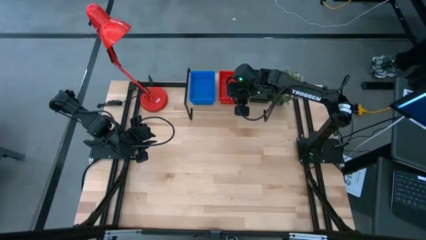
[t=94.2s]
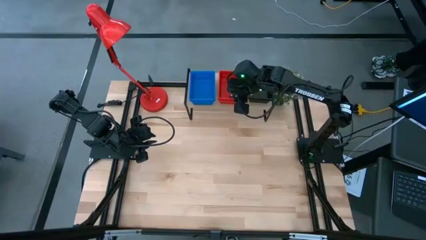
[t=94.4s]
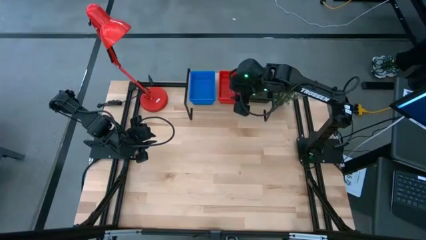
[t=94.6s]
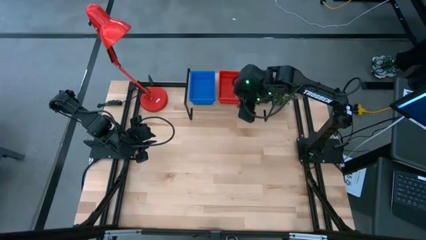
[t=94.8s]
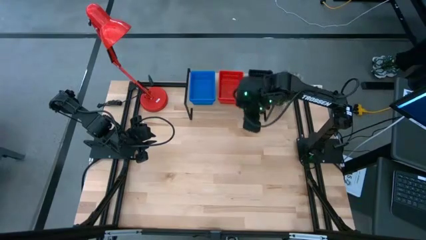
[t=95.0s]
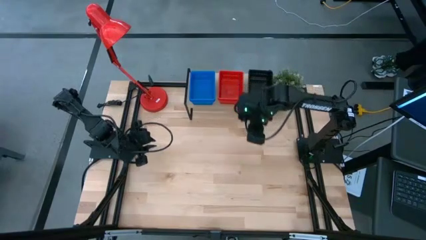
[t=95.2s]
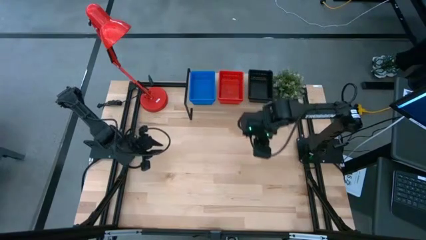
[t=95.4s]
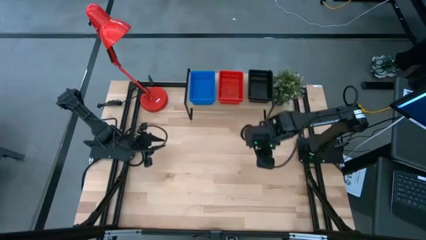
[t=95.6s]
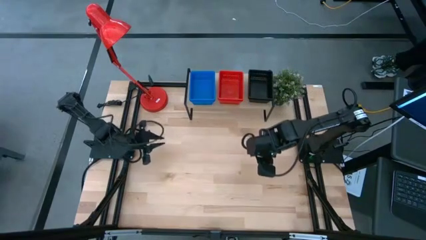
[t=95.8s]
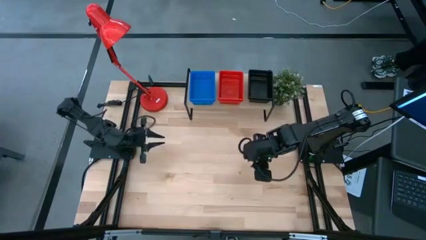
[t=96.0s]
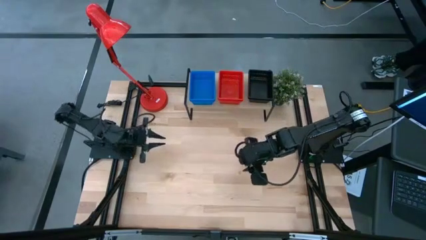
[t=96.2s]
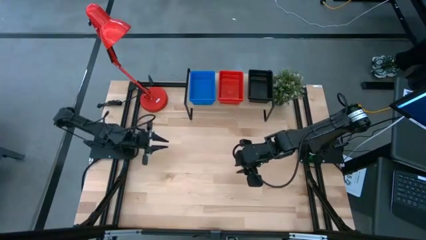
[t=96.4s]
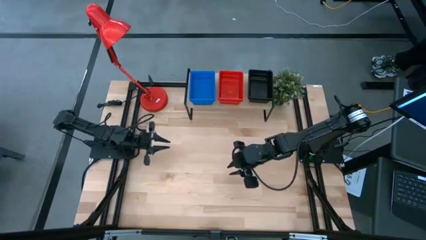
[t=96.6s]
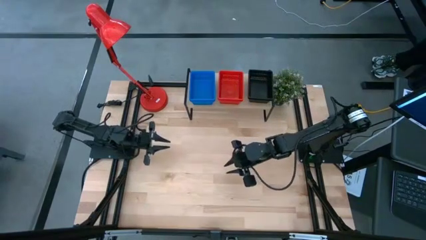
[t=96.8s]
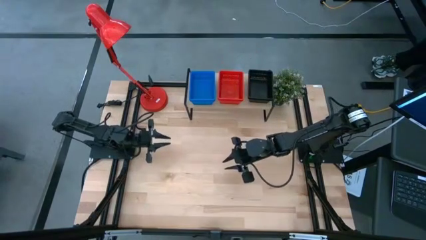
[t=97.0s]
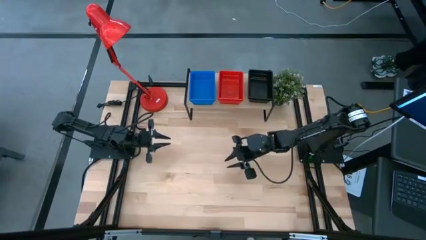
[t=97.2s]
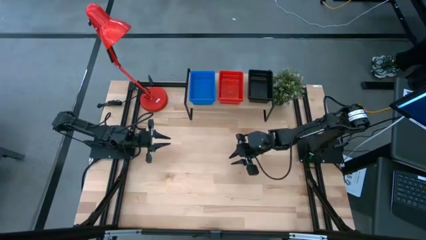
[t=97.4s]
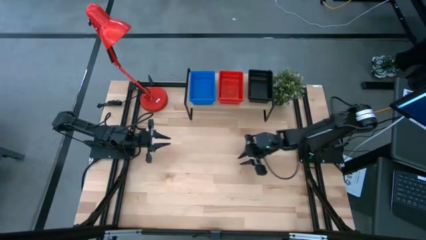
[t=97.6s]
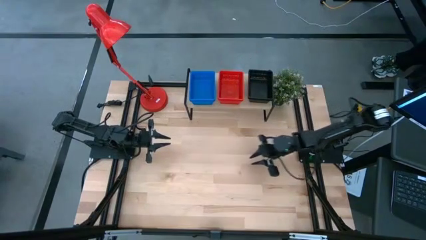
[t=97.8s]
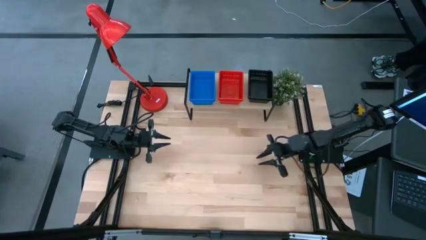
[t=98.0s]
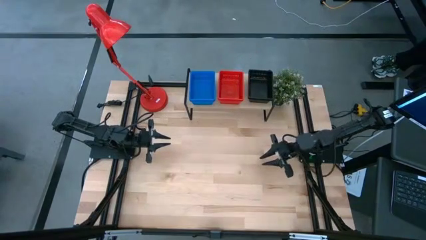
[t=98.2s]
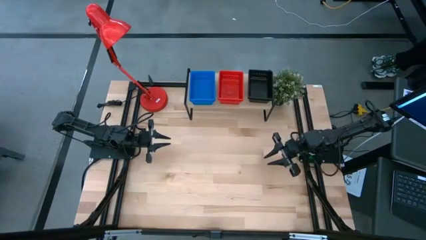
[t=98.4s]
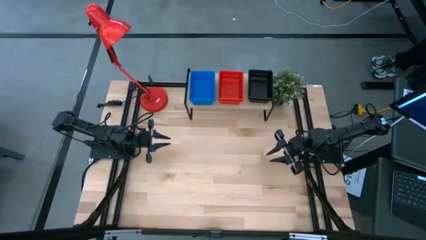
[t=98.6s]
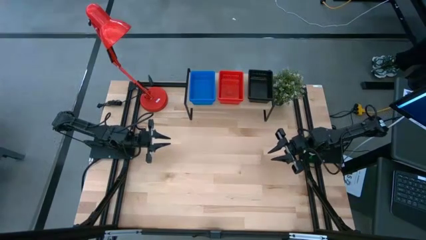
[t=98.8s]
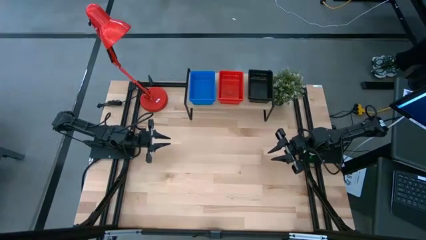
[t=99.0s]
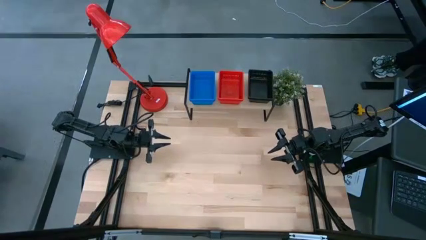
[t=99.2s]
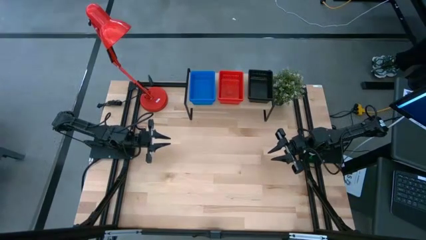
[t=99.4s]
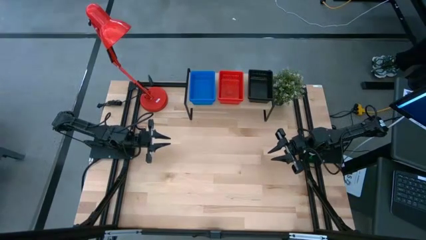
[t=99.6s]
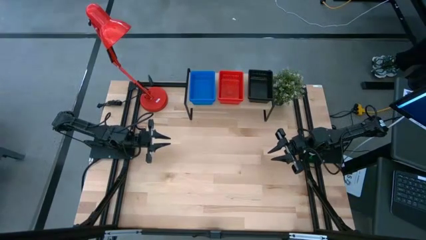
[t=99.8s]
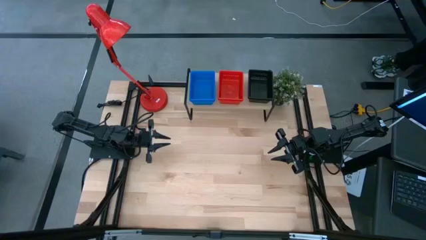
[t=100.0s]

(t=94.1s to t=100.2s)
Task: Stack baskets on shelf by color
Return to Home Position

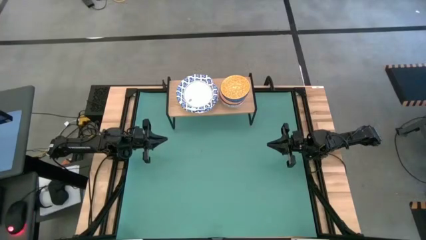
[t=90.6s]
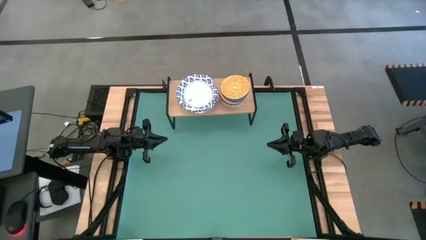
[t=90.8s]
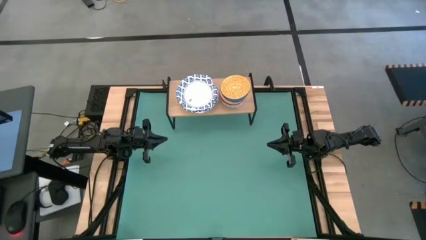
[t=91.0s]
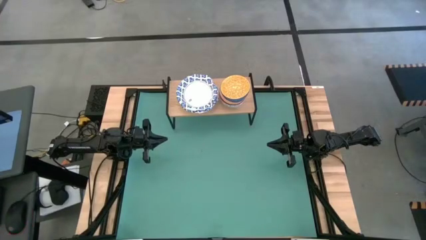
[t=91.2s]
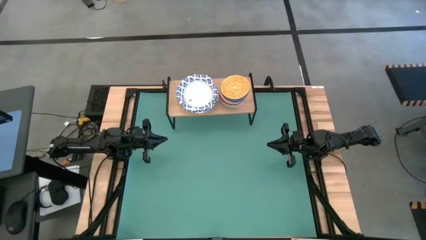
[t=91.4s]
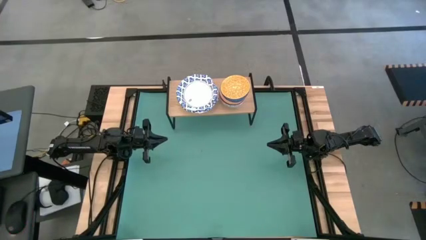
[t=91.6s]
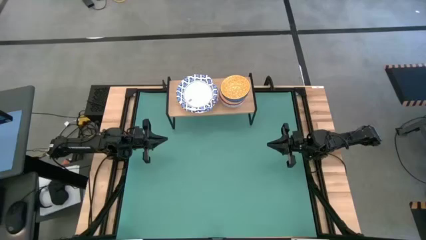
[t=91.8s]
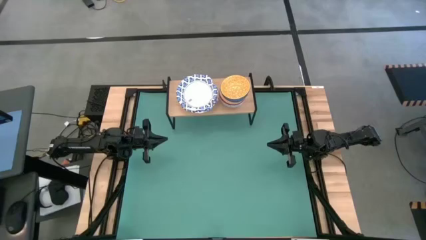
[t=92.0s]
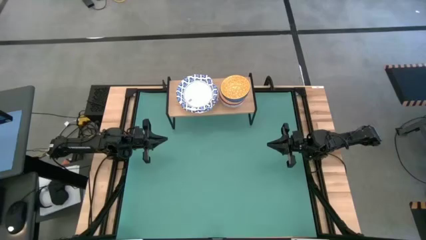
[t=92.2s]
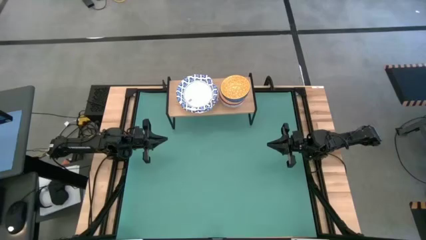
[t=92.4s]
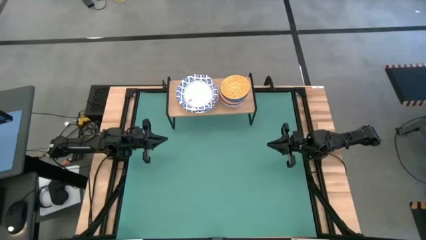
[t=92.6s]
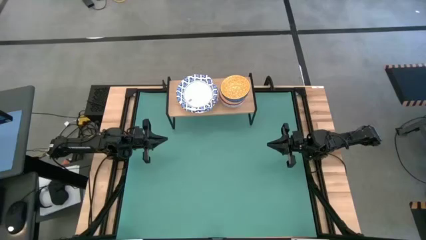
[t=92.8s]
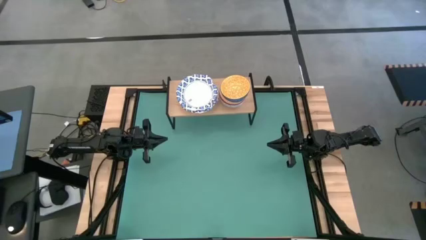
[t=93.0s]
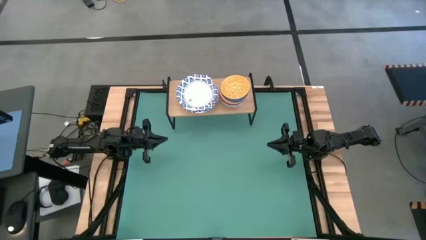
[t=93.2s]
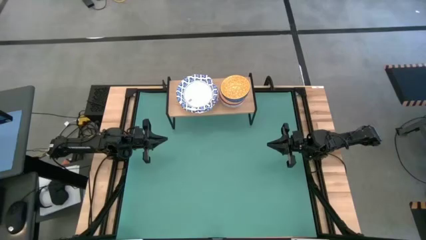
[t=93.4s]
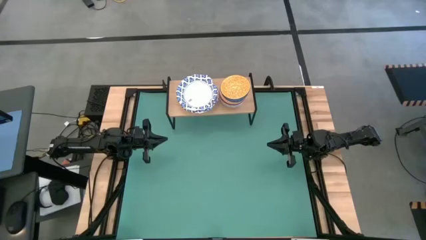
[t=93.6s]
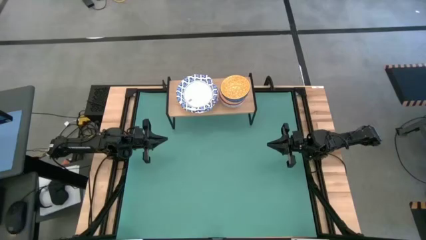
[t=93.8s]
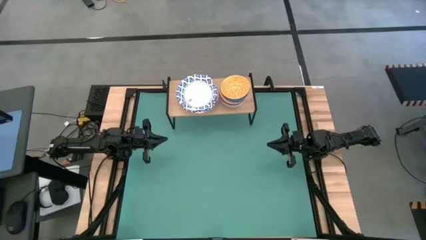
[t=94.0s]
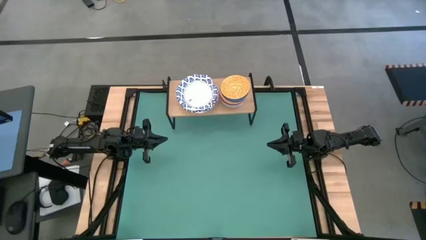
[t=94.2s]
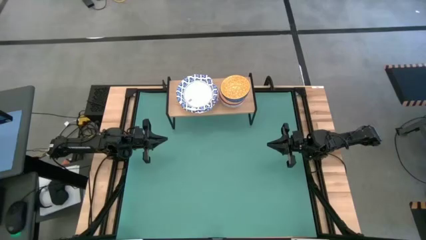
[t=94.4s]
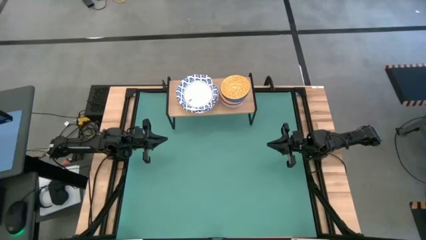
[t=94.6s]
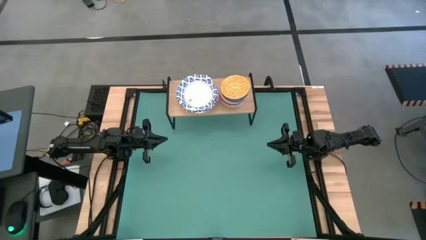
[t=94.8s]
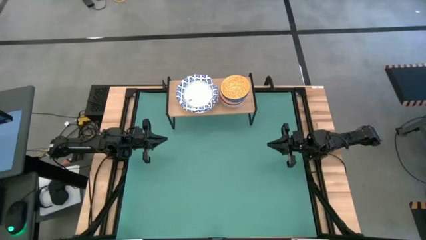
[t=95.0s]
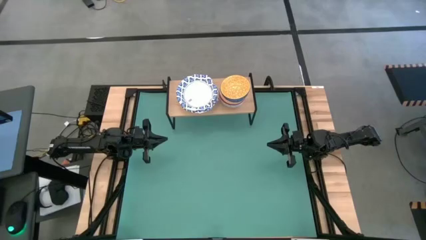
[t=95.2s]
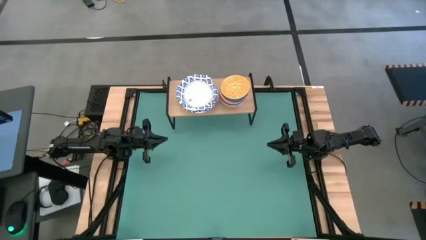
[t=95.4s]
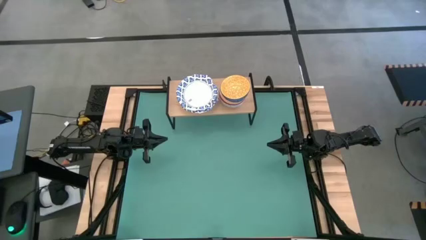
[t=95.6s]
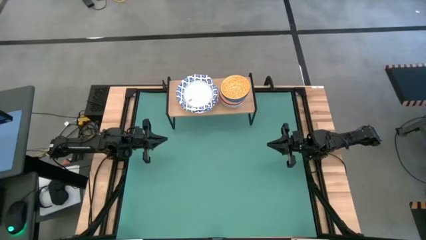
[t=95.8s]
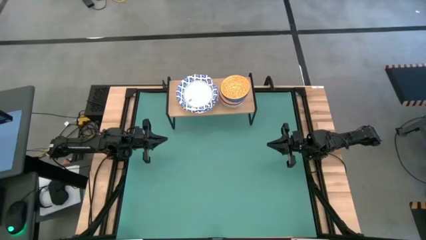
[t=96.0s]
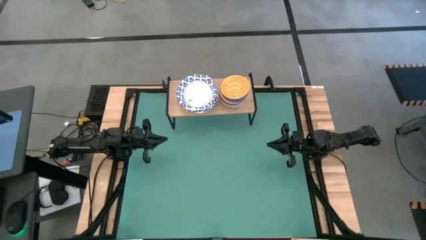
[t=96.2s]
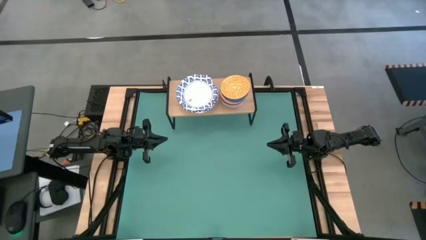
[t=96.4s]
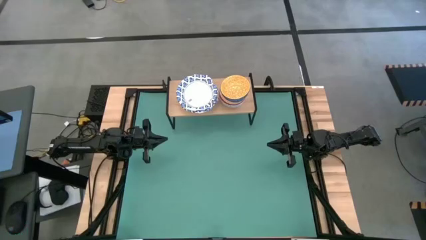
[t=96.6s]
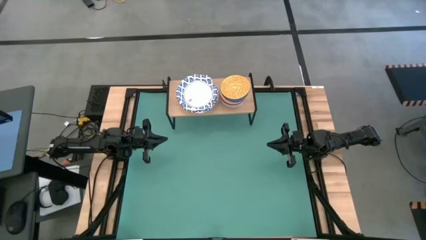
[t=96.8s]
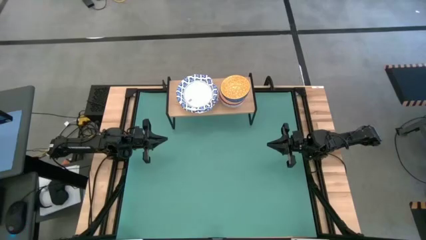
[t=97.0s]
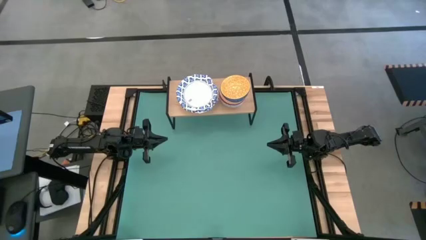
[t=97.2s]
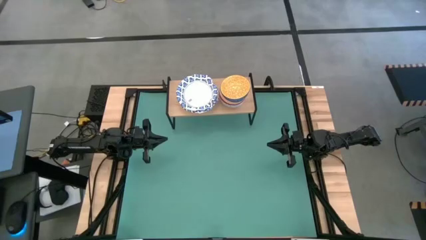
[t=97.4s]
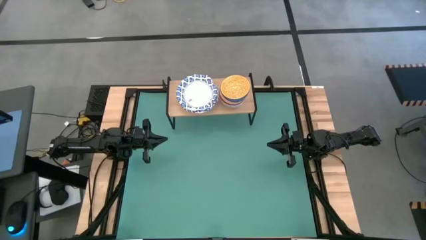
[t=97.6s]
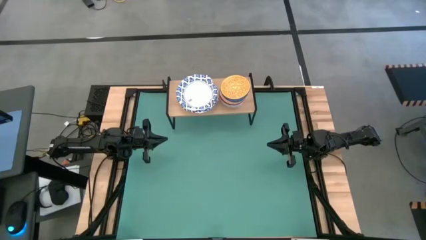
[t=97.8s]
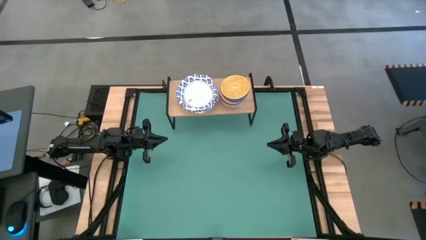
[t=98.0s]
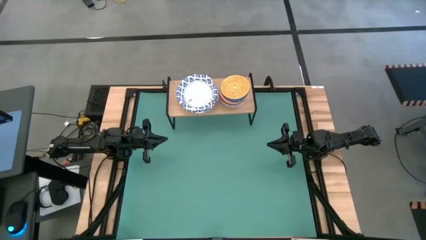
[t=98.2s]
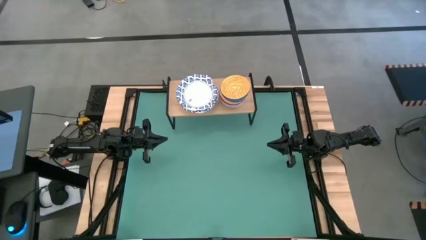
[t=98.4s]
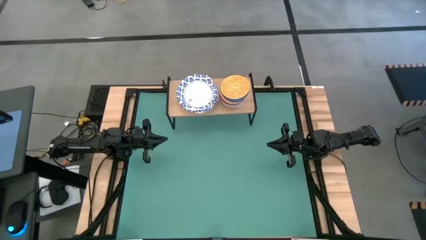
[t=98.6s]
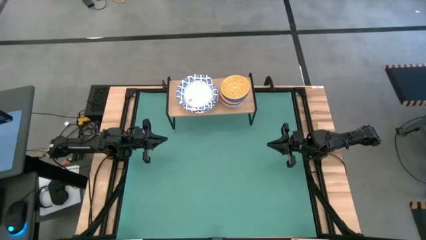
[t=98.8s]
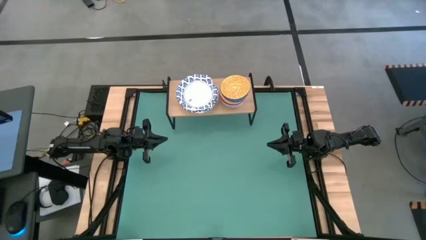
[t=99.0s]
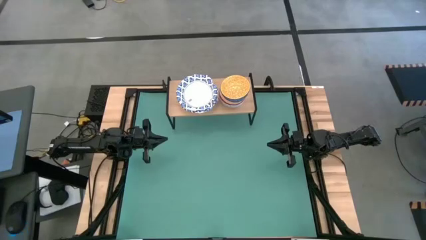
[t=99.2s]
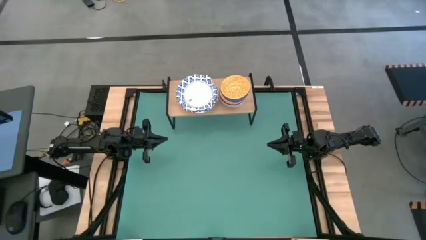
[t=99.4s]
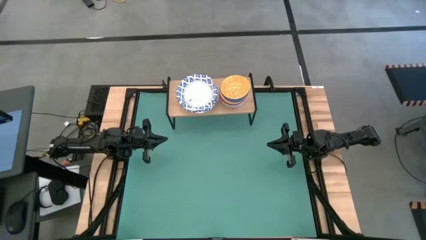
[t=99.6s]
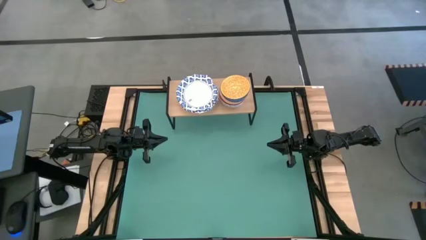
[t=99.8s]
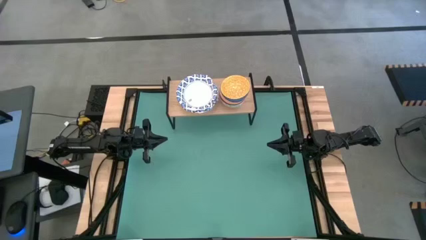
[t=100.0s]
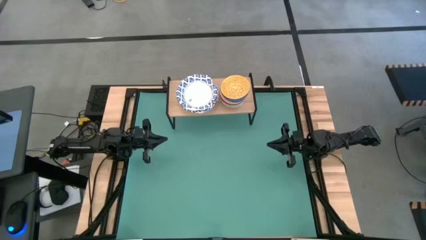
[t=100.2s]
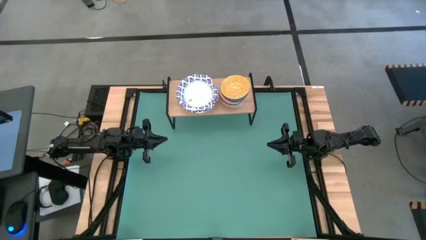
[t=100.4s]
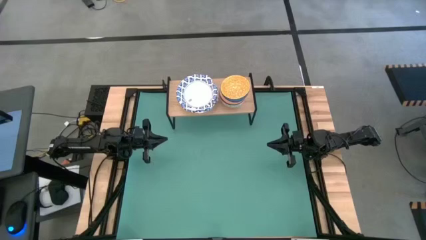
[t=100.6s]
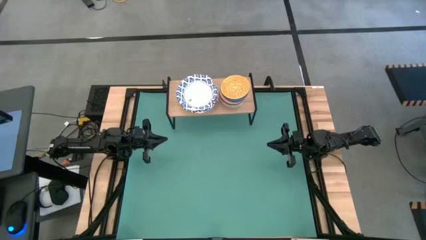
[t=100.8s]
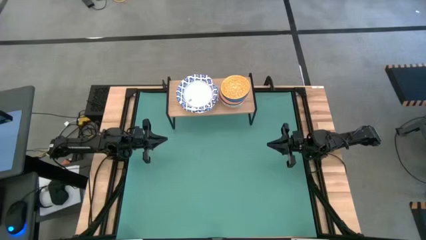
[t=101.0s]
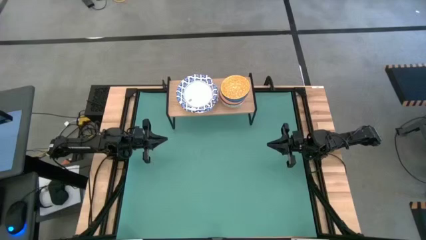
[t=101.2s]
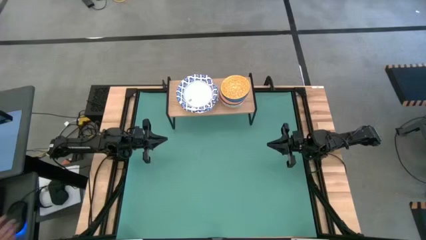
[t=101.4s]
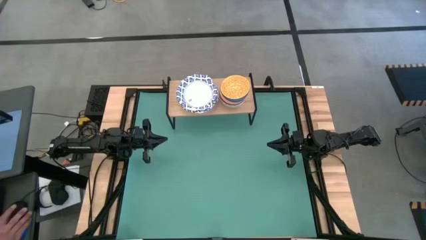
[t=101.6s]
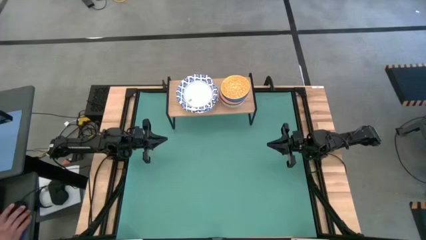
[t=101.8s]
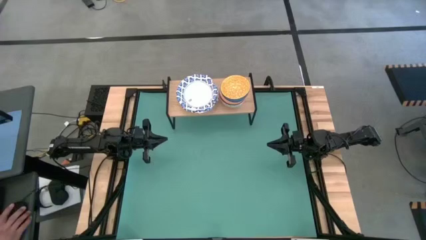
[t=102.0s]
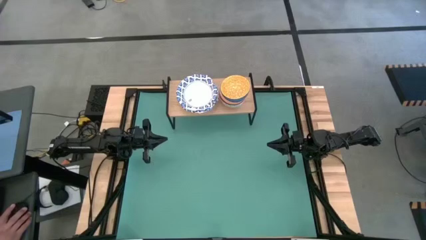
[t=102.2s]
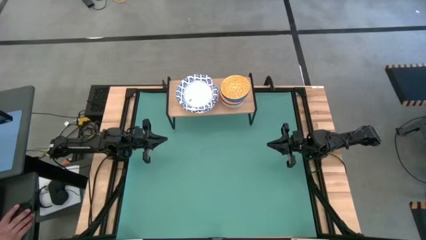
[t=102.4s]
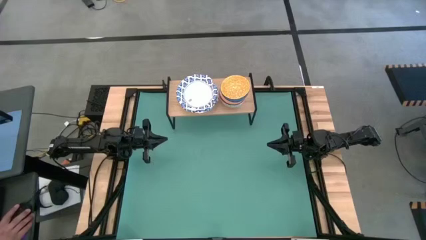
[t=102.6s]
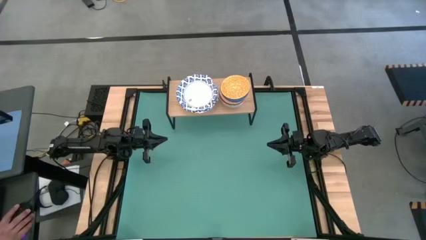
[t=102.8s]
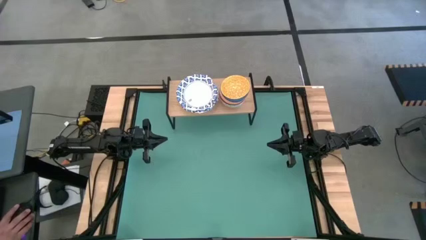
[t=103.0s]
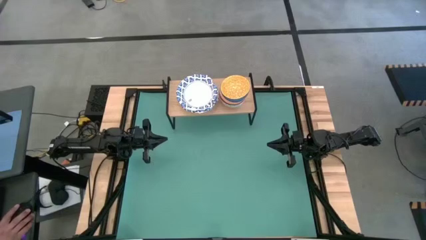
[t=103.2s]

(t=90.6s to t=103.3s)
Task: Place and stack bowls onto a shelf
Return to Home Position
